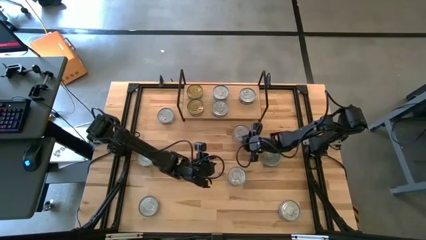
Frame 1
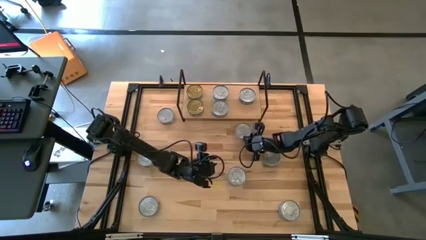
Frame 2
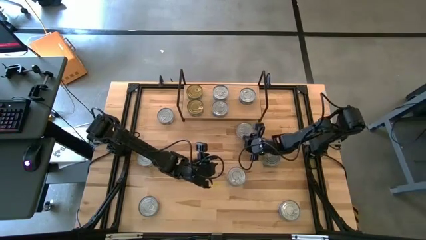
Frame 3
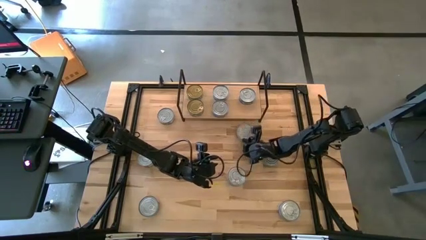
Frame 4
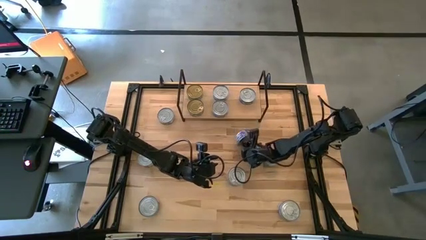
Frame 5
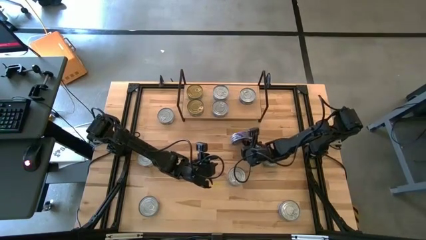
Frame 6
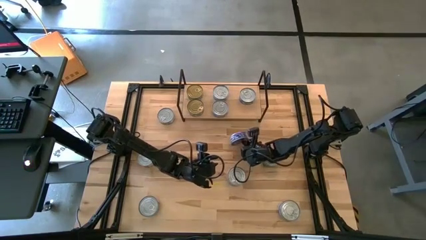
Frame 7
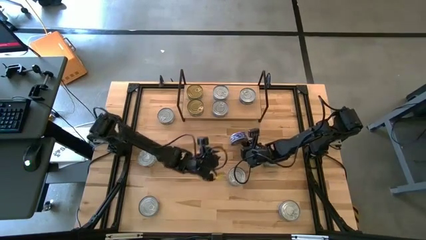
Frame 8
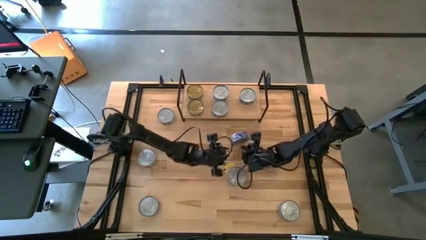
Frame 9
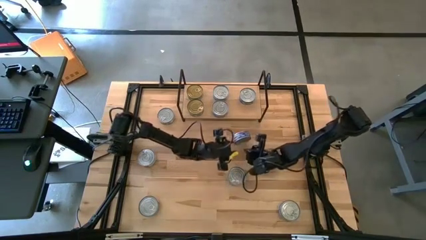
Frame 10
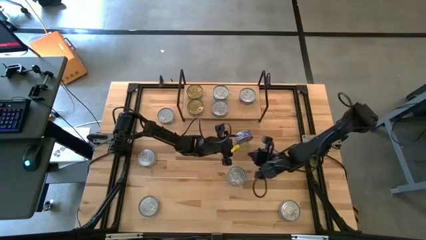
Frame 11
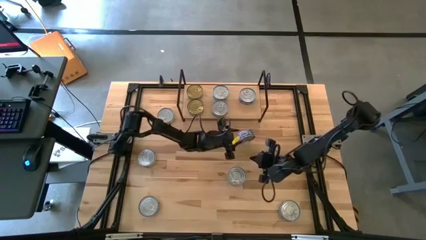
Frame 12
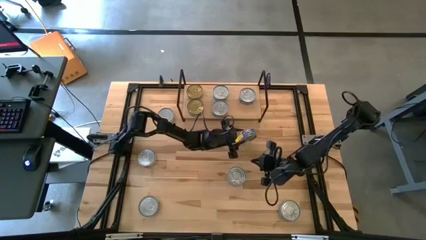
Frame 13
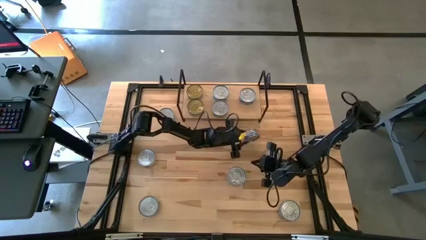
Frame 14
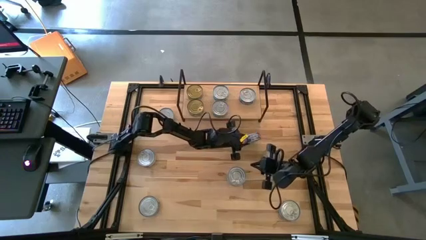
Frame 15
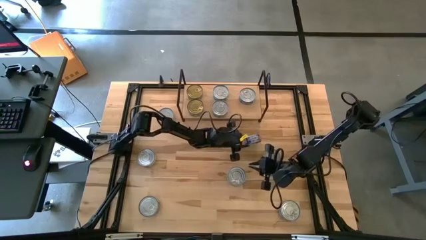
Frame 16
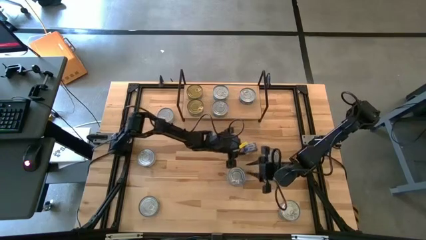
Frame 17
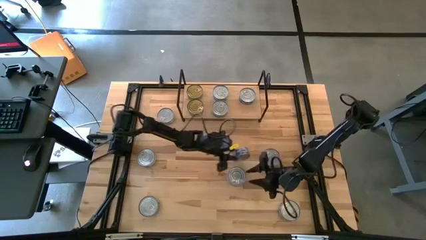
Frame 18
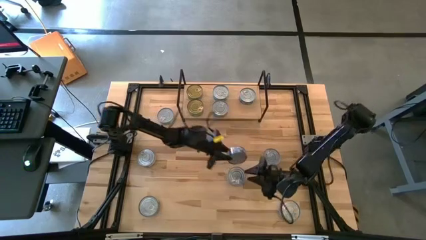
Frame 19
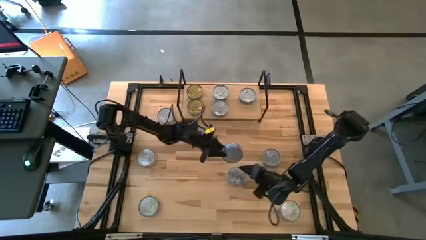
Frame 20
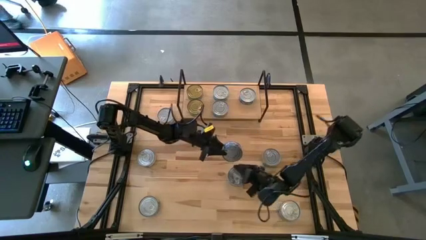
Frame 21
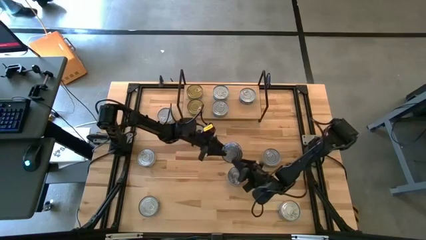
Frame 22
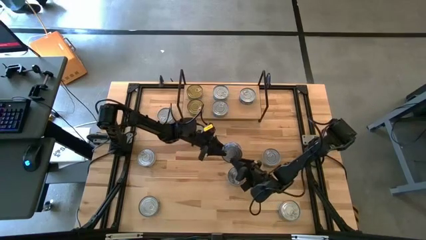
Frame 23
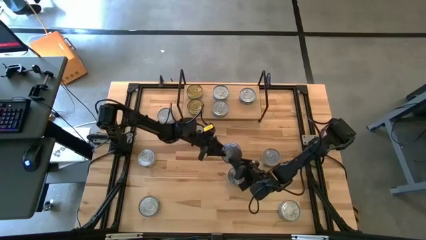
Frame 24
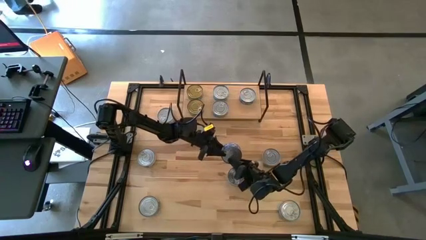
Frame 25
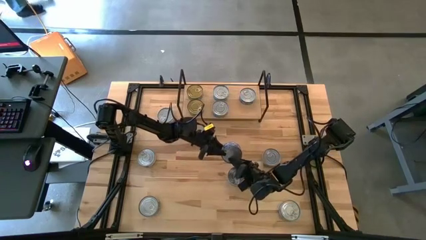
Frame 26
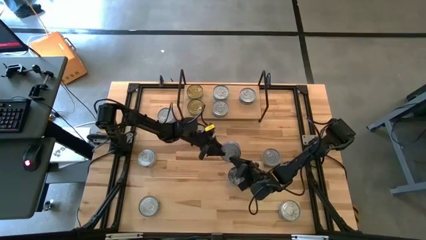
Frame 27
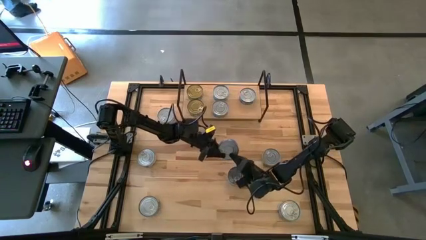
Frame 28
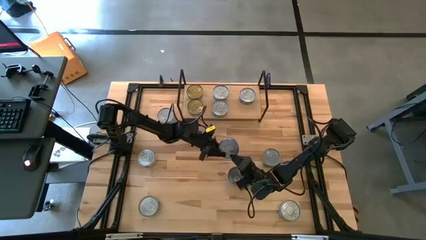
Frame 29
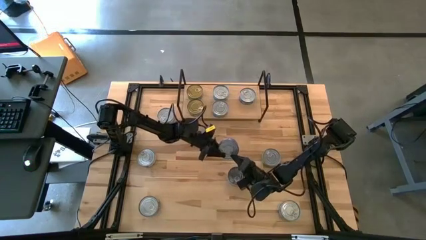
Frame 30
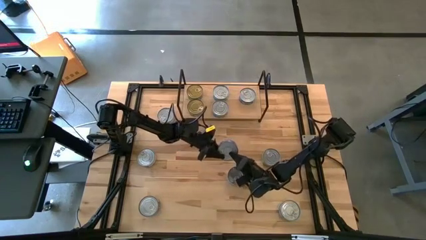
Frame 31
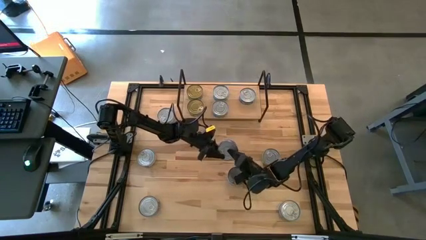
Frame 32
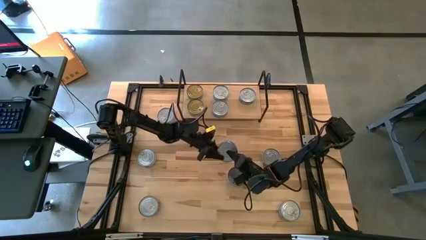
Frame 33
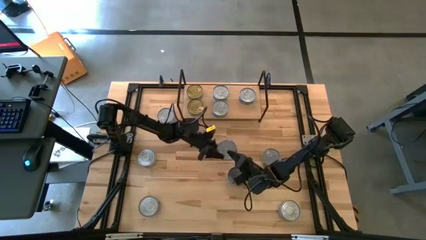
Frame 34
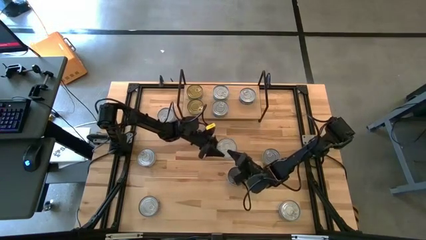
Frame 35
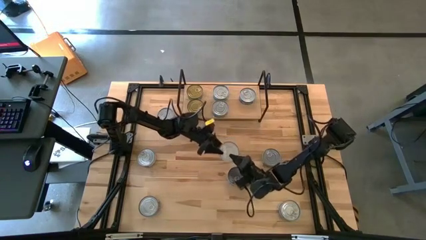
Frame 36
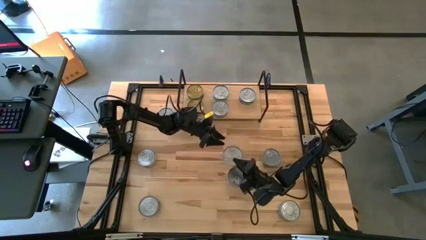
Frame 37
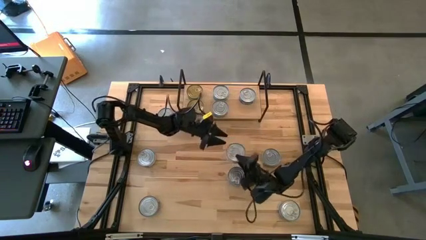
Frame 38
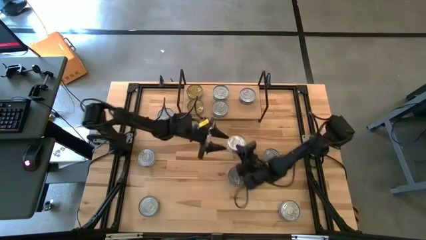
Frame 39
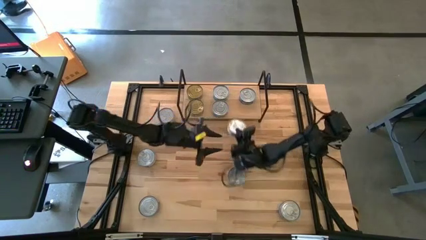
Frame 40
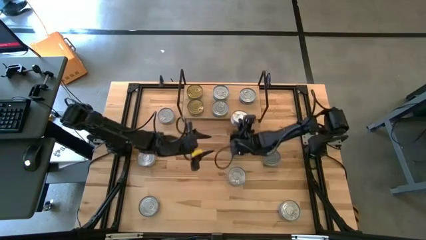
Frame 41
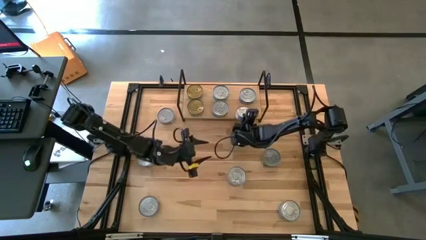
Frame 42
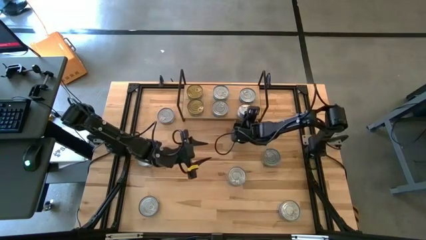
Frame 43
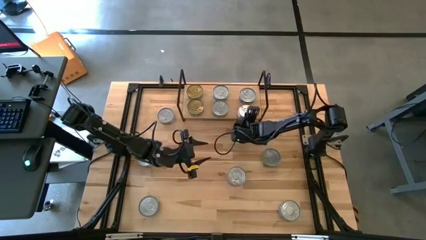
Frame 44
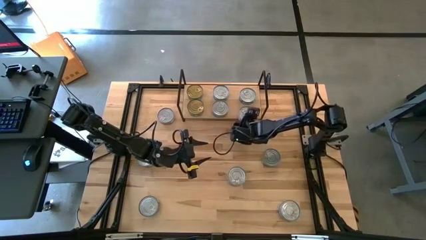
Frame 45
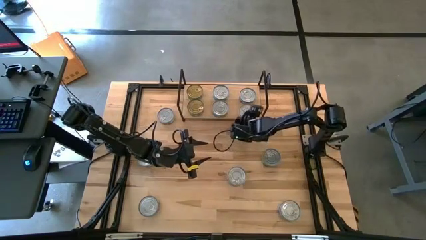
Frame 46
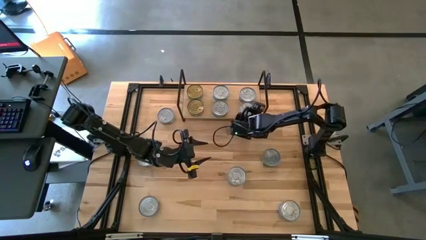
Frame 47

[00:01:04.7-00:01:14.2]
Task: Stack canned seafood by type on shelf
Put the blue tuna can aligned with the other blue tuna can on the shelf

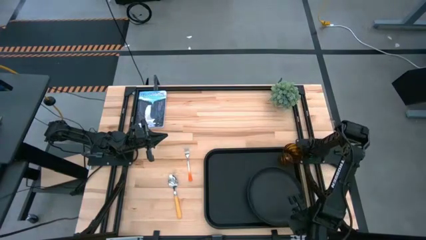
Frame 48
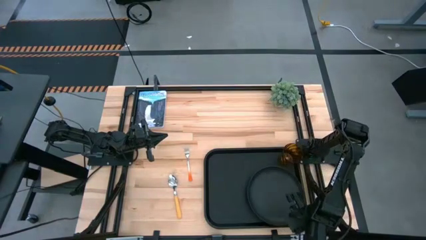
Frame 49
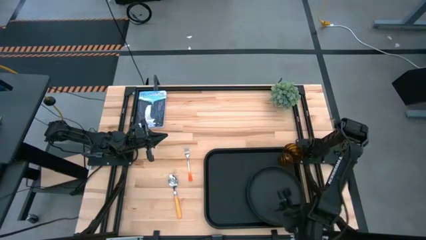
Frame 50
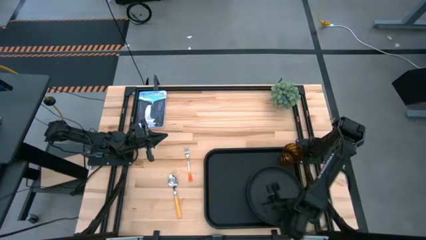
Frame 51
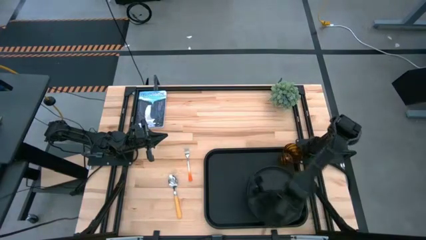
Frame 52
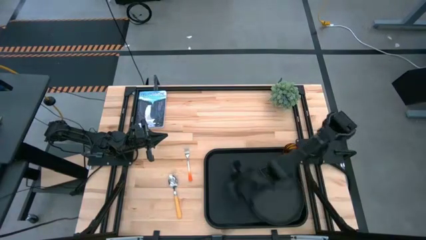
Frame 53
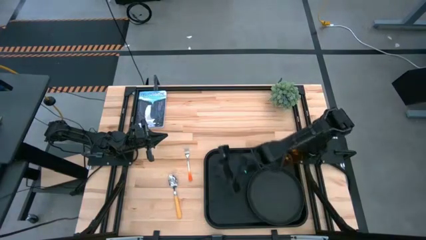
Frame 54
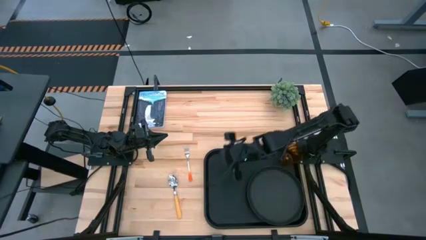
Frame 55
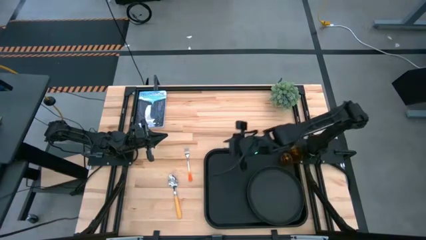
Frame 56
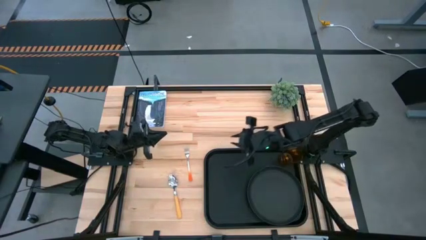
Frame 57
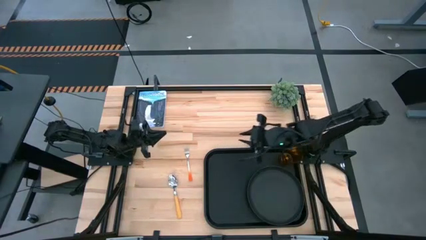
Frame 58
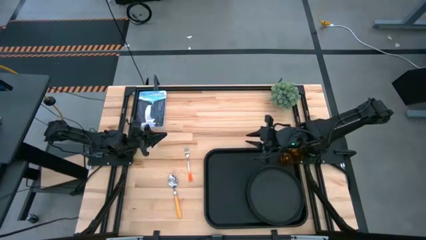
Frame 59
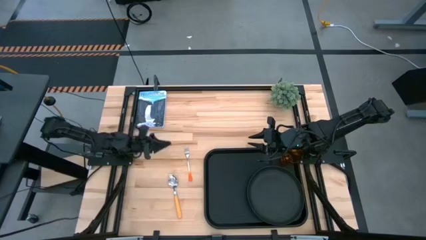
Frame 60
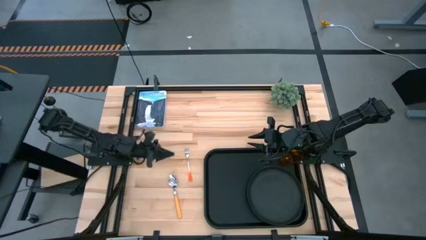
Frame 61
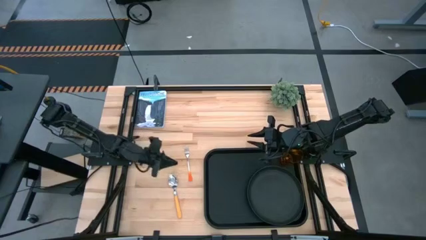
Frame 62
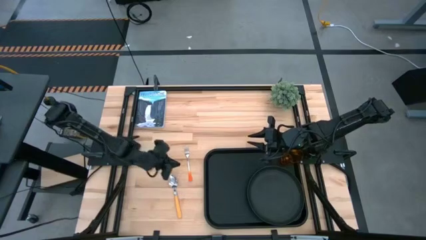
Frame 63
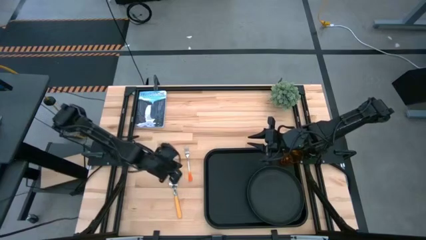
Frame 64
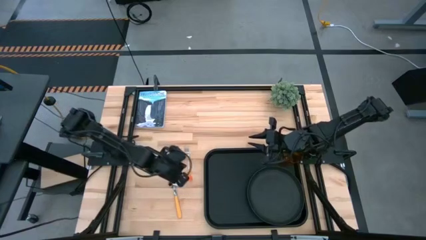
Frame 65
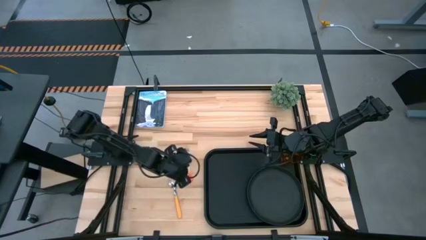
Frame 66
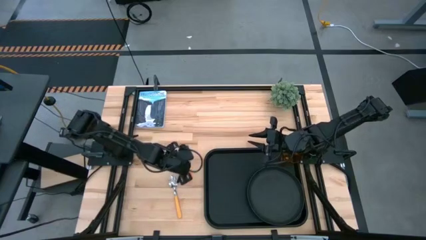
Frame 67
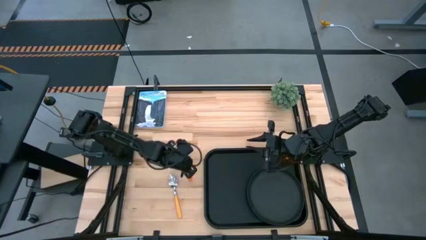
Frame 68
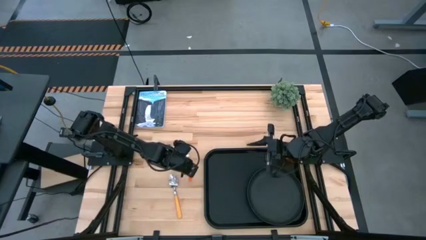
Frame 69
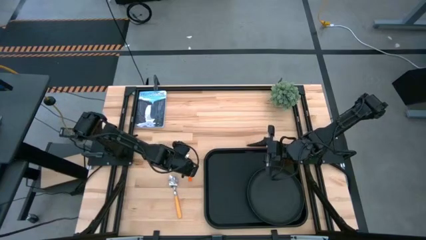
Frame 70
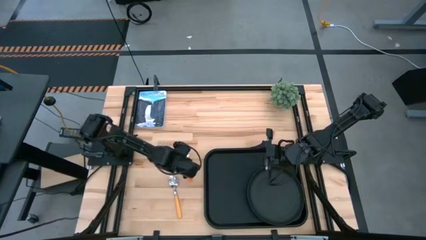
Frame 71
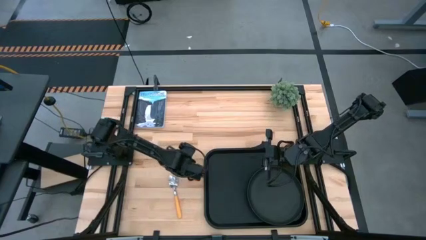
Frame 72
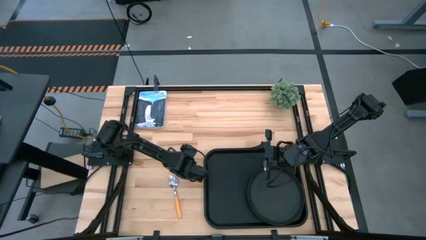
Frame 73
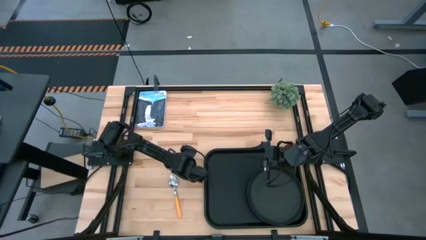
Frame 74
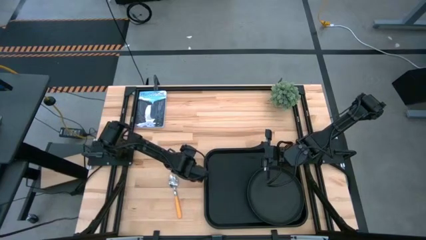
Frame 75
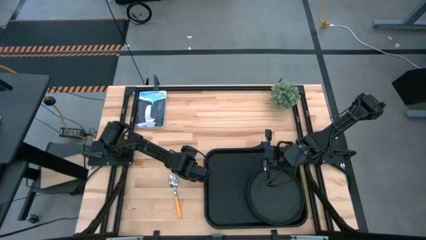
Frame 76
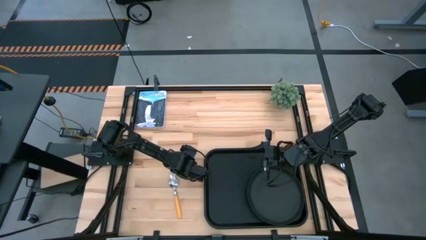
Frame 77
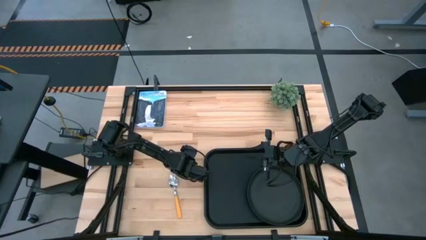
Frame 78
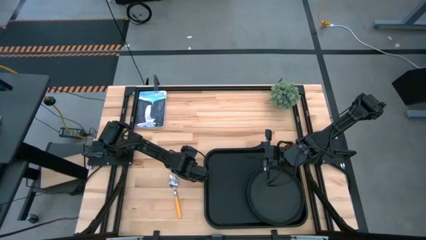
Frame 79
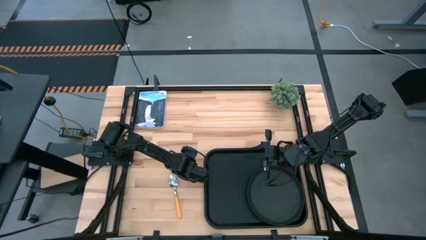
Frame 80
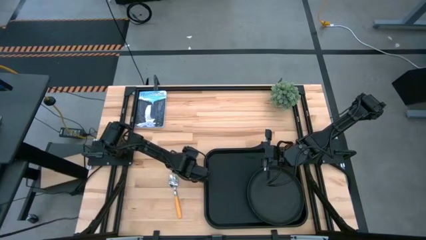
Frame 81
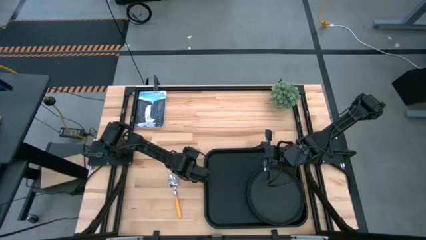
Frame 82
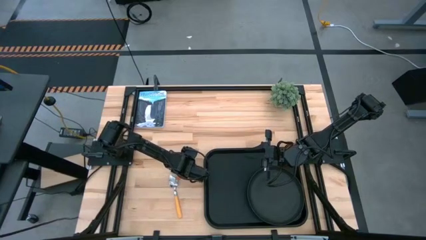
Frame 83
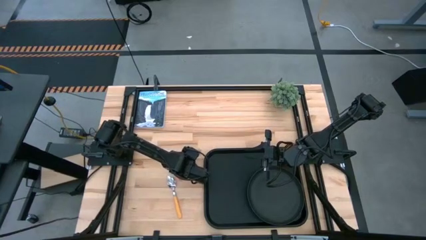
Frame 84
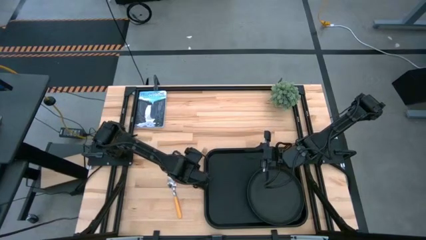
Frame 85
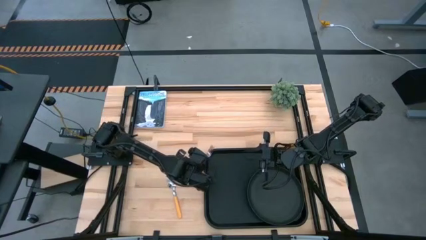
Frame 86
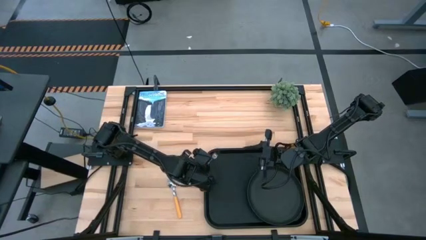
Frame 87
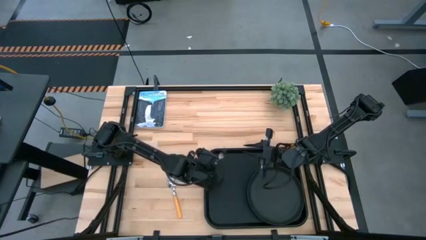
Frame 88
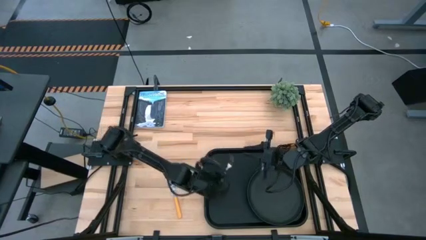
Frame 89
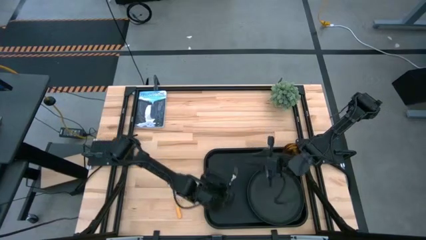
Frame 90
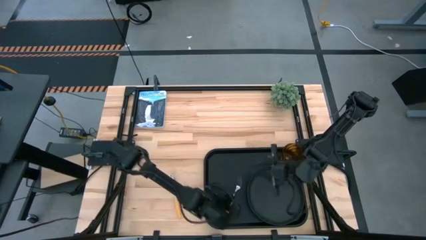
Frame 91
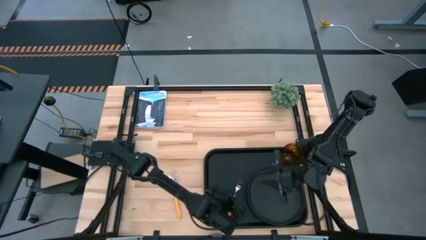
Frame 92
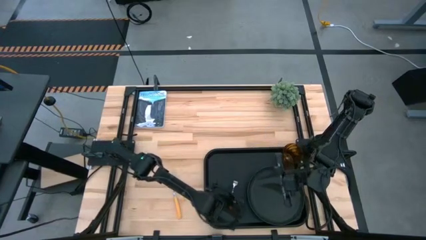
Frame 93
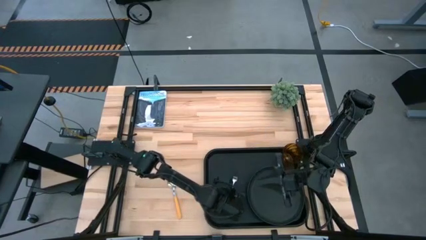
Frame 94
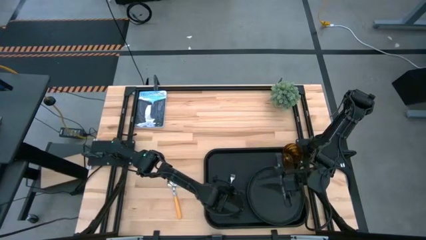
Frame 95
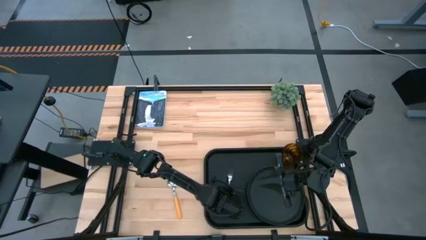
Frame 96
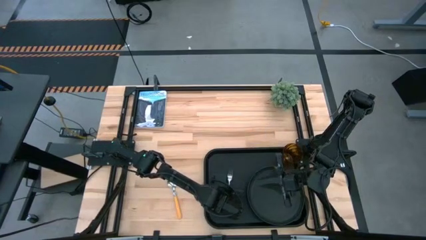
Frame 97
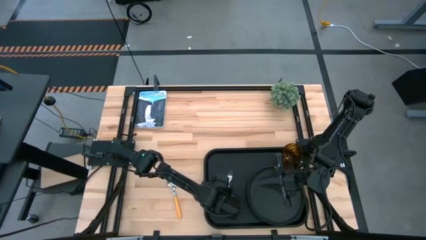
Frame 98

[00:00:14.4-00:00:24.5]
Task: Pick and place plate/cup/fork/spoon on tray
Put the orange fork on the black tray to the left of the black plate
